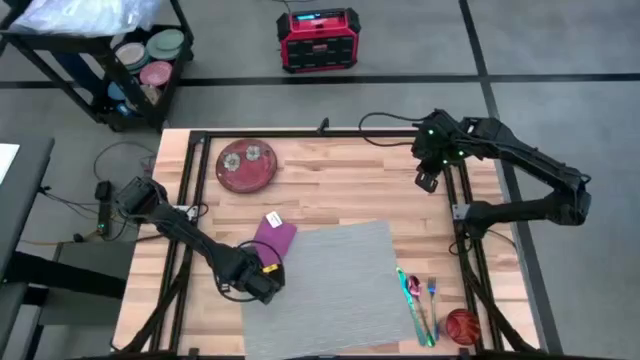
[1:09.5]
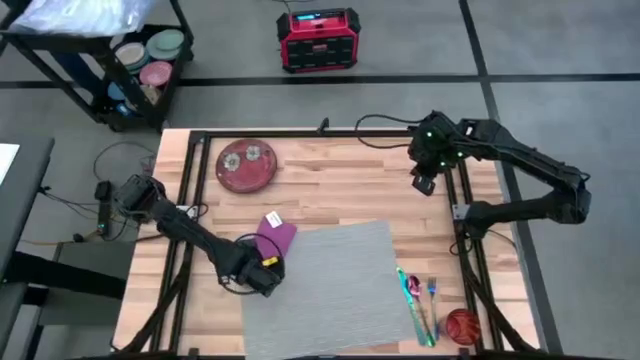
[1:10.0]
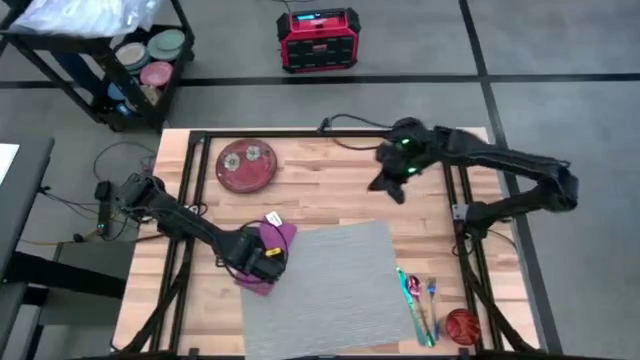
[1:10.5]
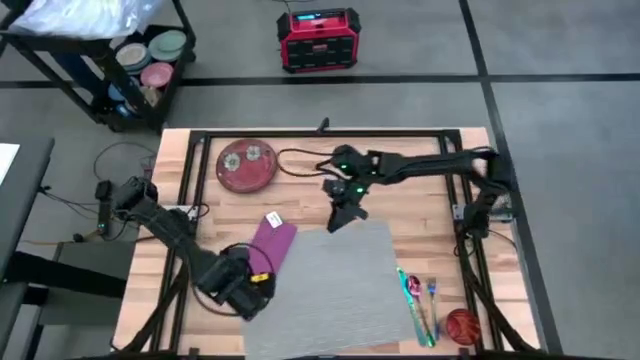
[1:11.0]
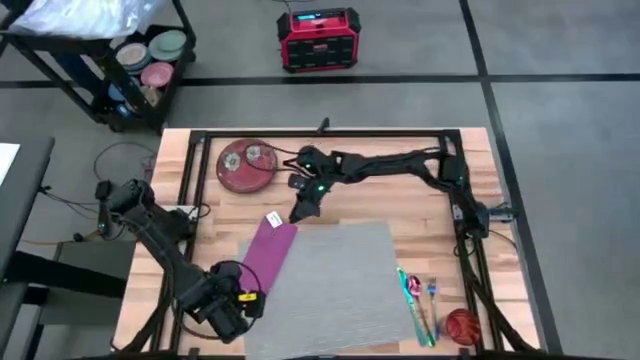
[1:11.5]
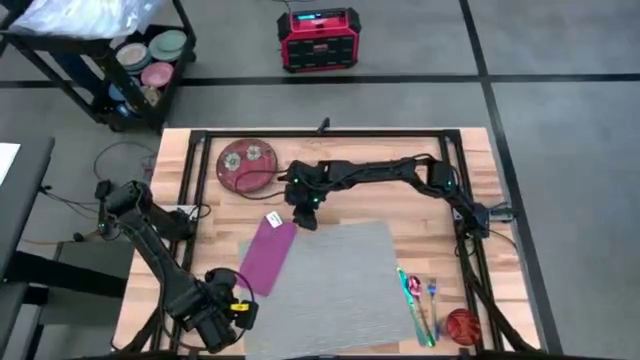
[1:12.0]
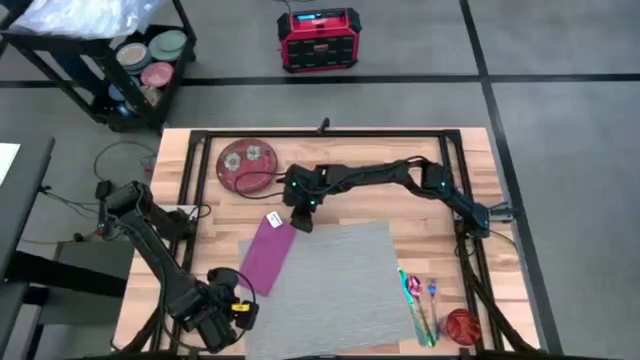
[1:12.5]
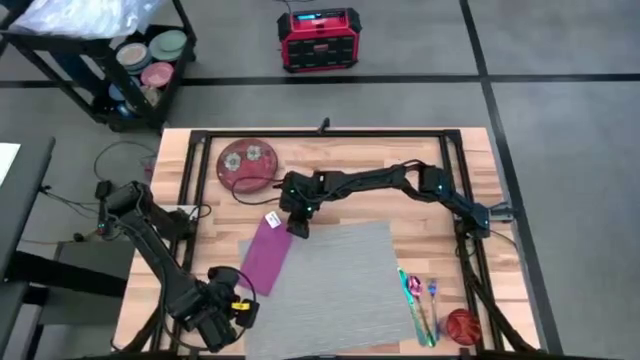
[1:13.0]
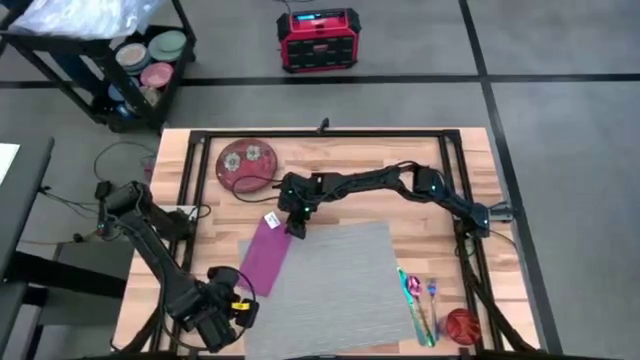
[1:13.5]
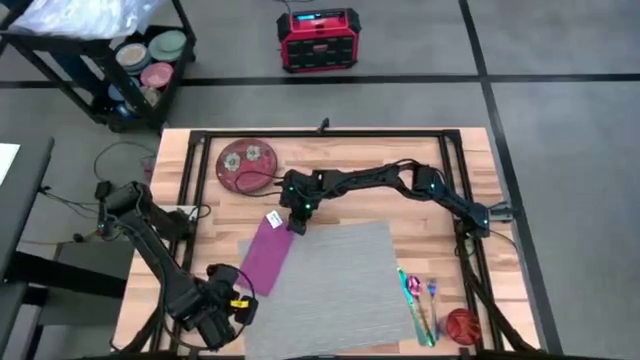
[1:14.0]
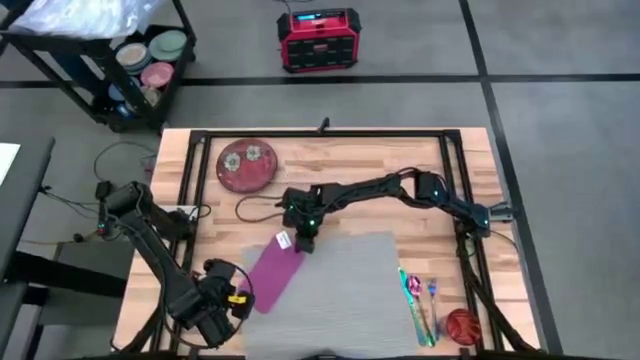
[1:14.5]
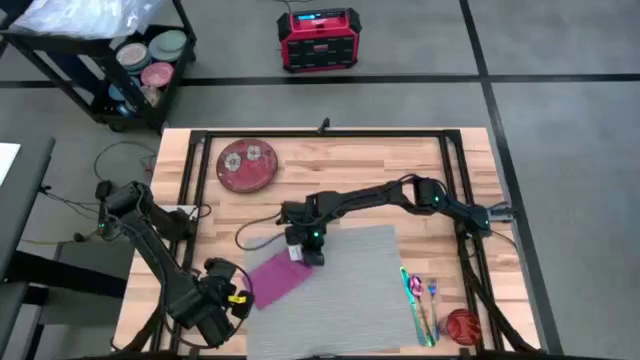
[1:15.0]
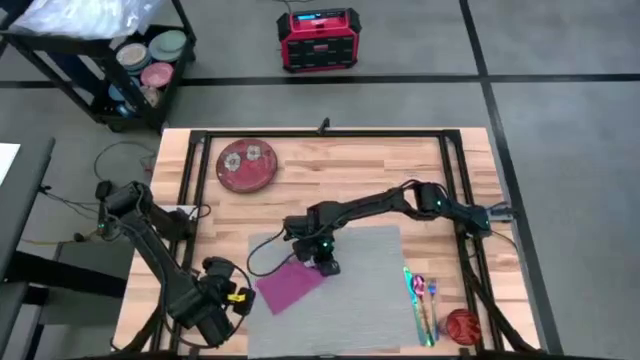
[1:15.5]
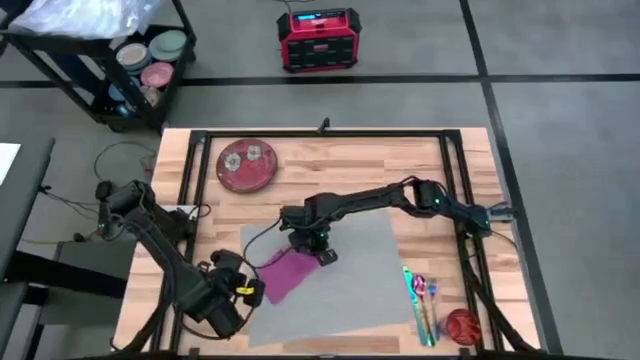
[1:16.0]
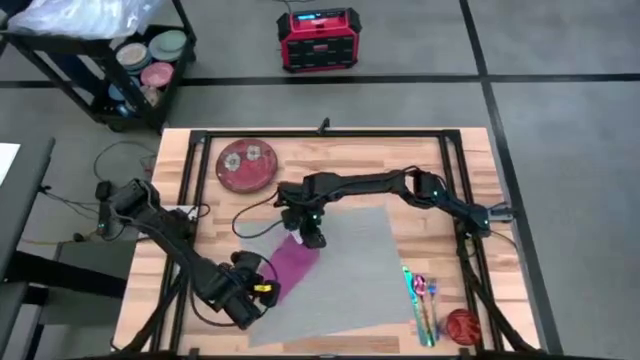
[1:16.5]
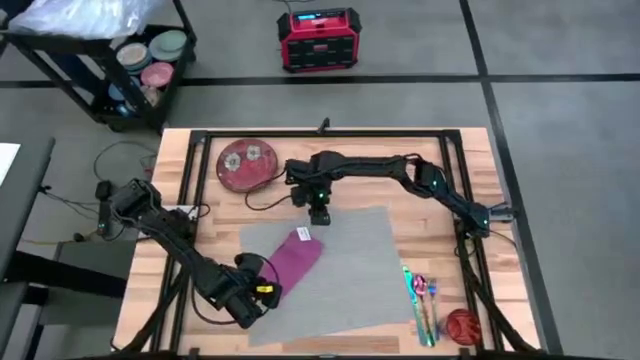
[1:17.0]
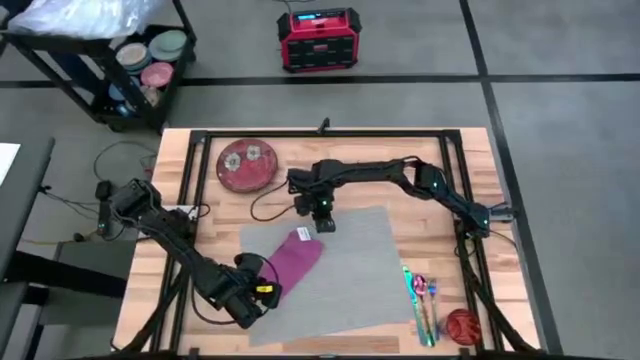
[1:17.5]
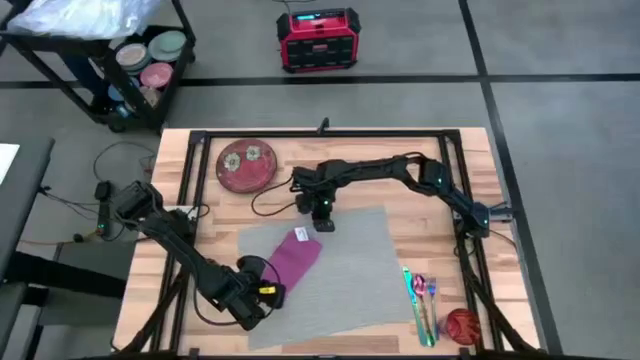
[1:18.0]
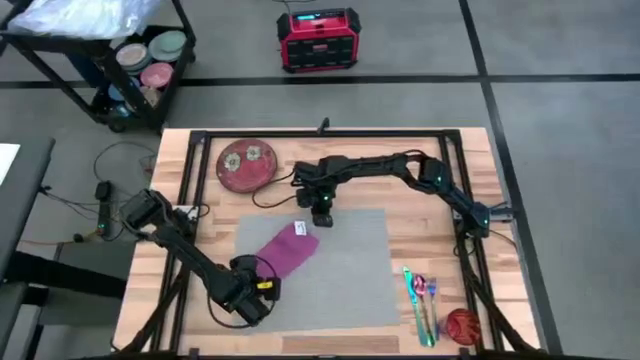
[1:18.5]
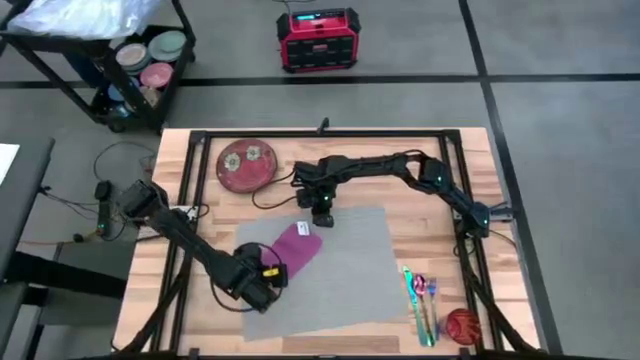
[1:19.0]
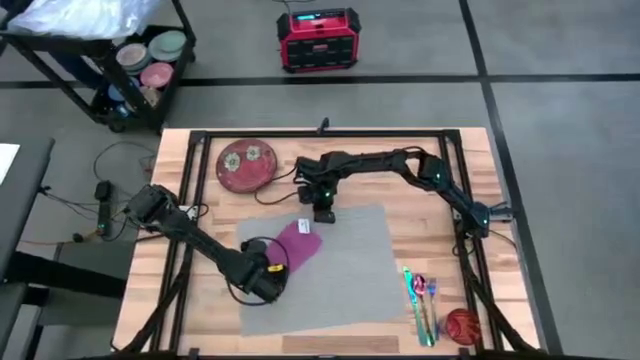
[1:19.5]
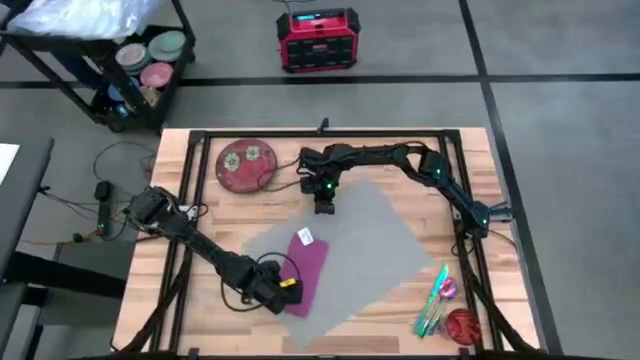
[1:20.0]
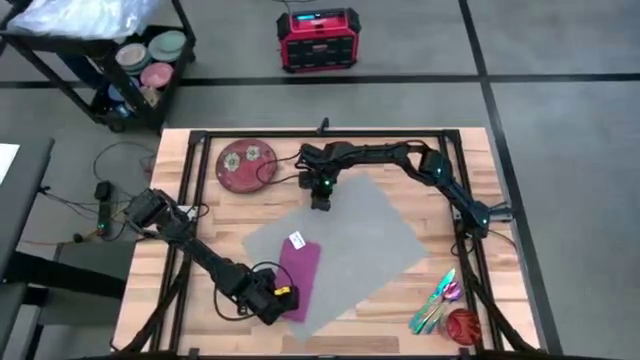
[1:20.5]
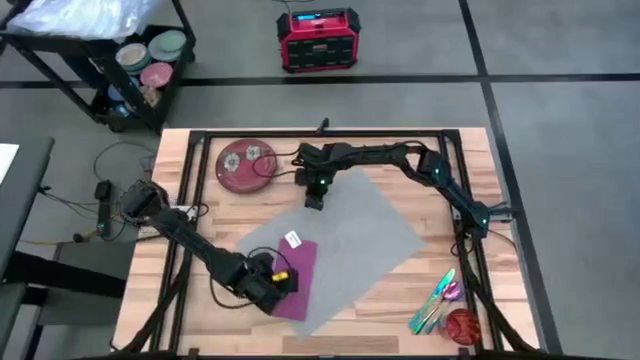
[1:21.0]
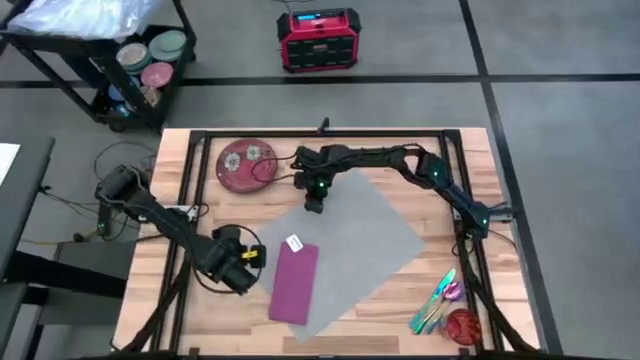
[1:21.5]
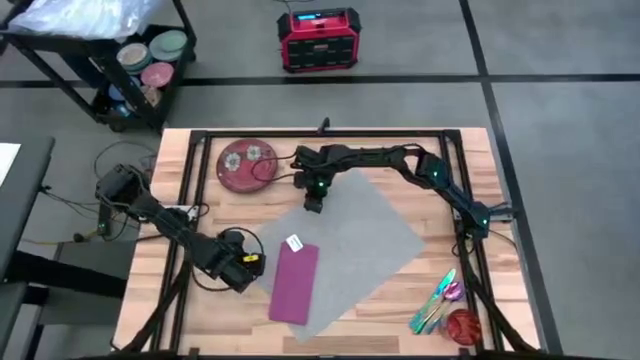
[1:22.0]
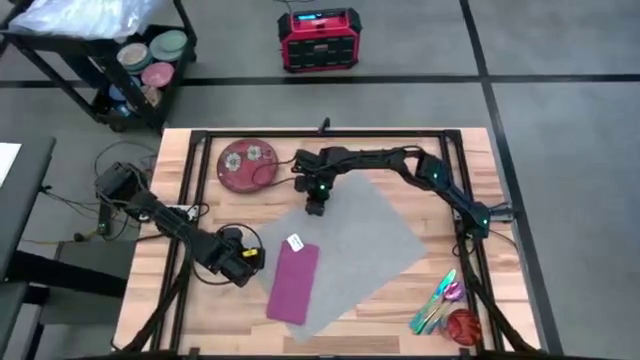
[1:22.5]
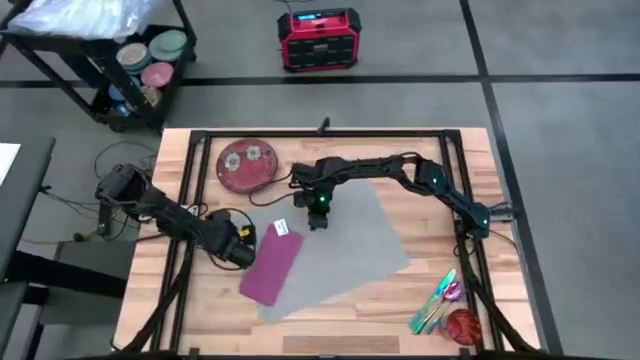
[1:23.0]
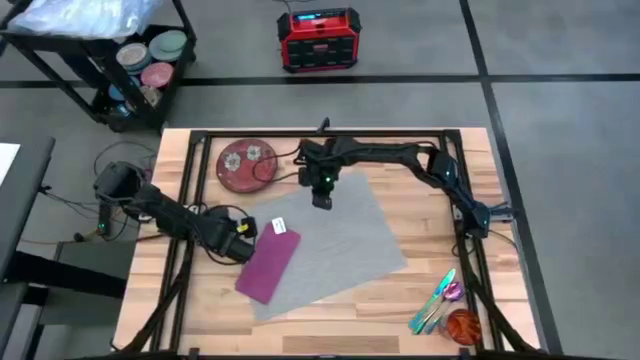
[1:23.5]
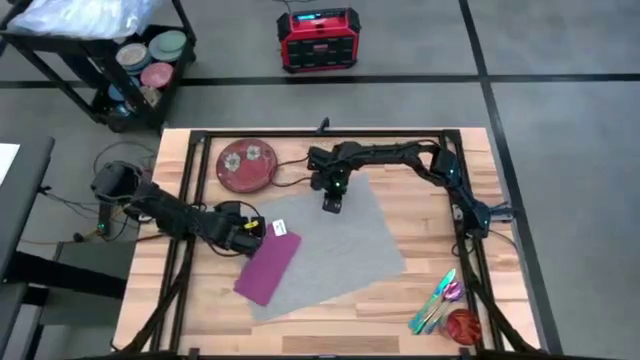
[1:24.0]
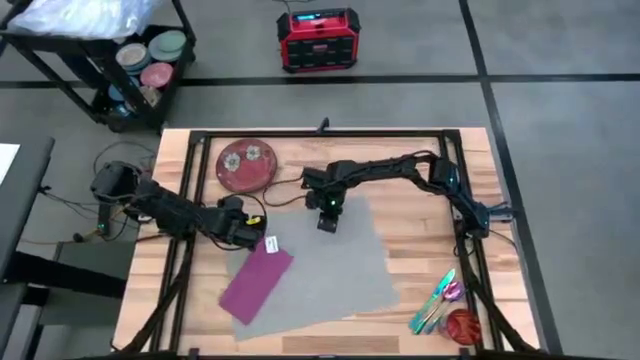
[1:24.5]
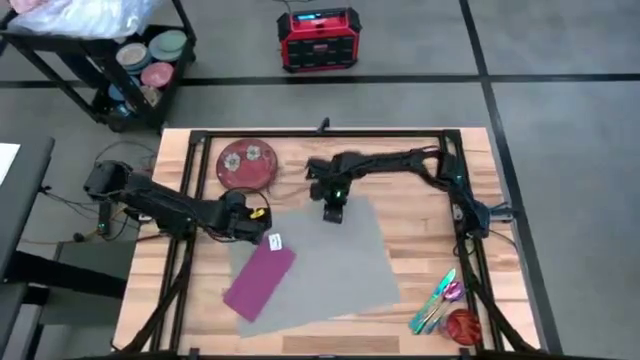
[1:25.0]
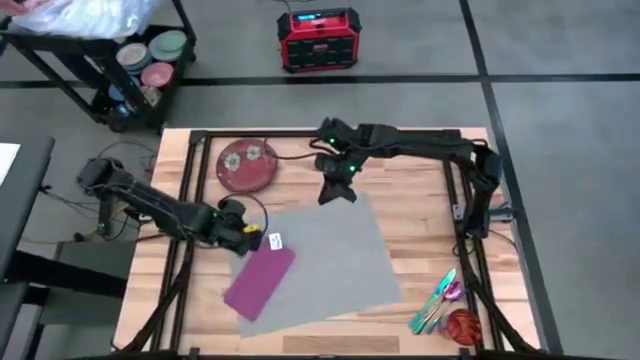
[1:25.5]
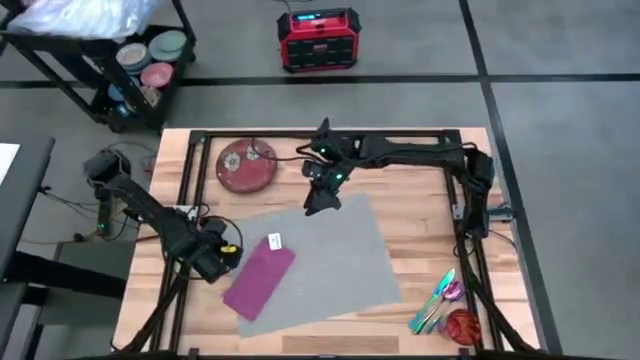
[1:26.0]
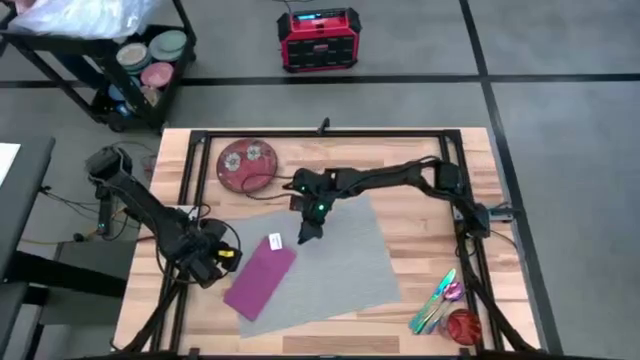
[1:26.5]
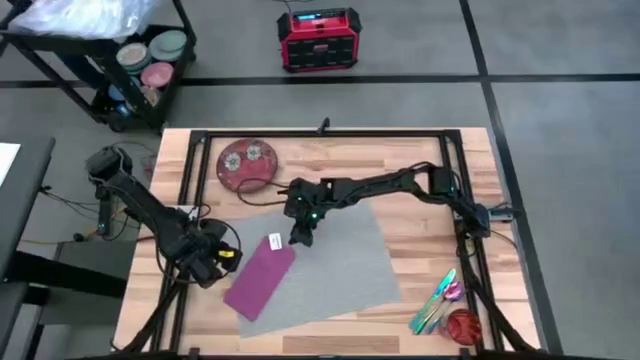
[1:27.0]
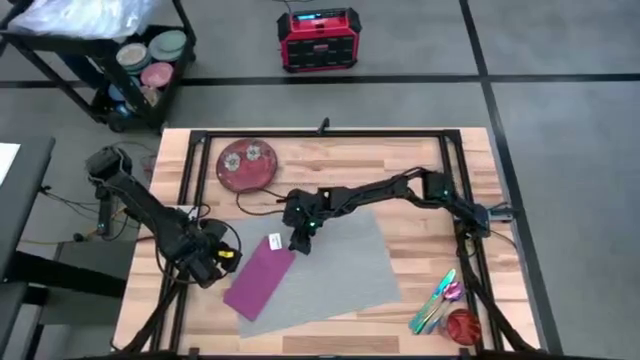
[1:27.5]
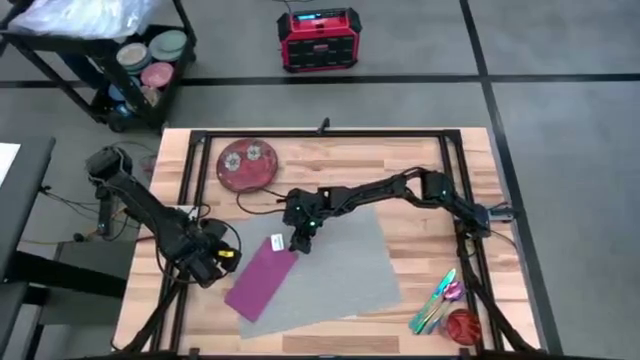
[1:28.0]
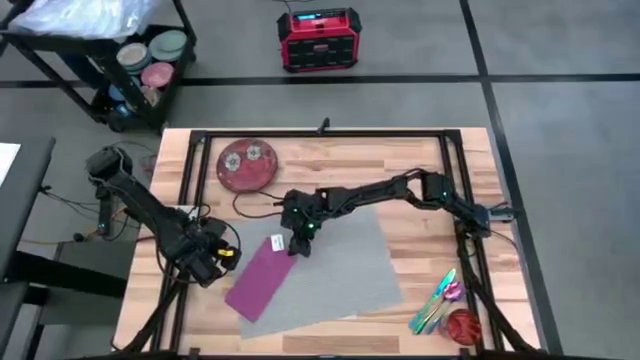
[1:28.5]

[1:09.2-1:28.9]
Task: Set table place
Put the pink table napkin on the gray table mat

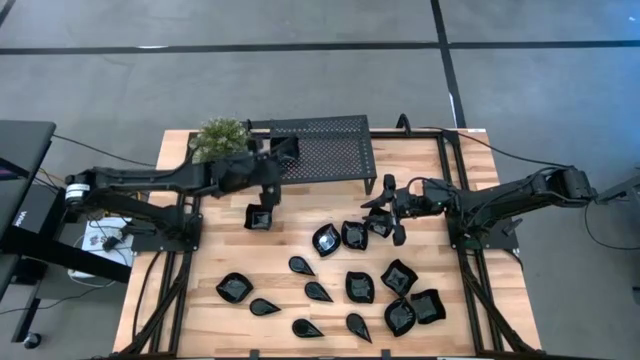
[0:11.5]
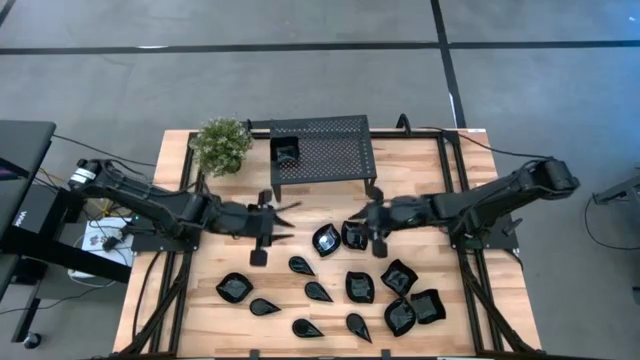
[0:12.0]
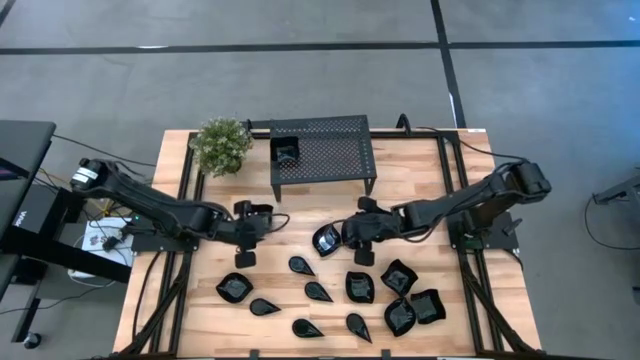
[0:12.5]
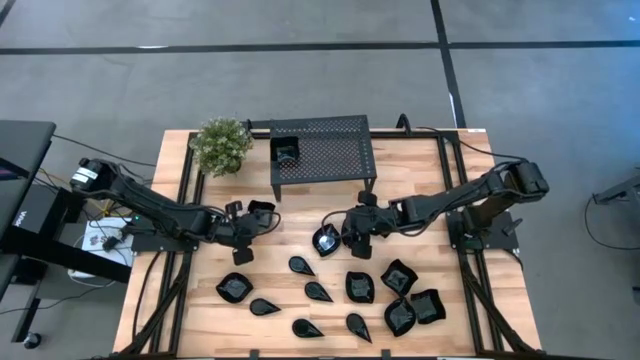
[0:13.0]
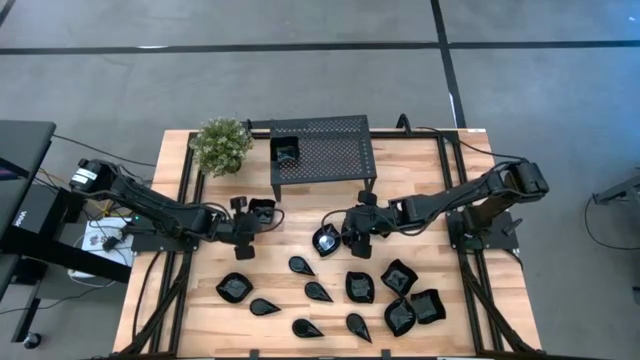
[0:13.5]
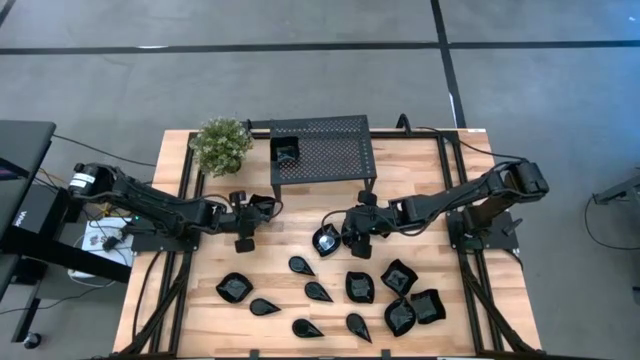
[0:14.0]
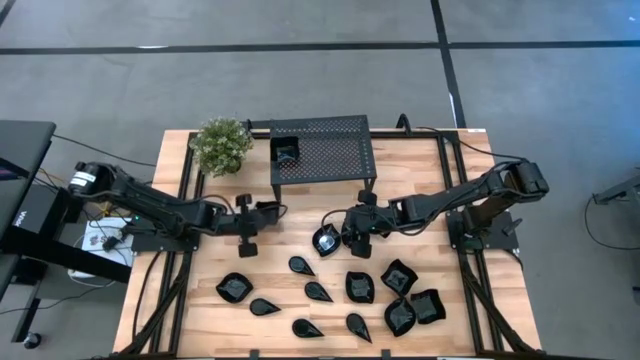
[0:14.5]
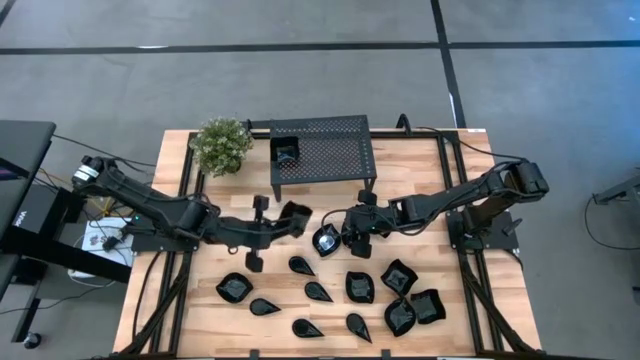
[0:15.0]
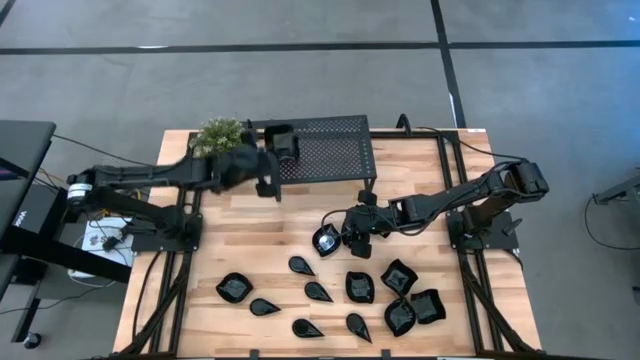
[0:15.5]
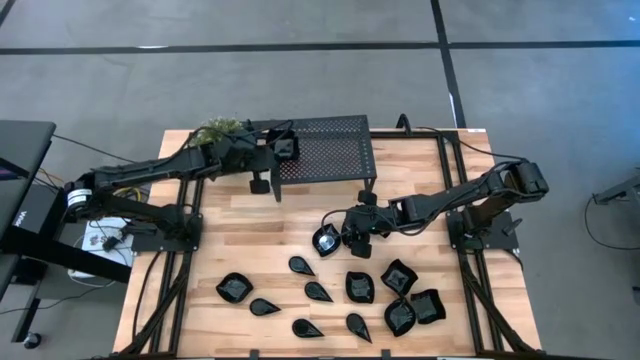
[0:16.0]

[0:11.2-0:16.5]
Task: Pick & Place Mini shaped plates
Stack the distorted square plate on top of the distorted square plate on the shelf
